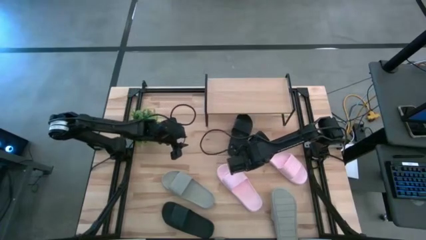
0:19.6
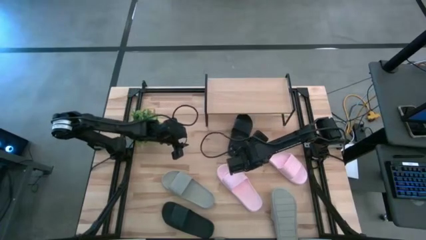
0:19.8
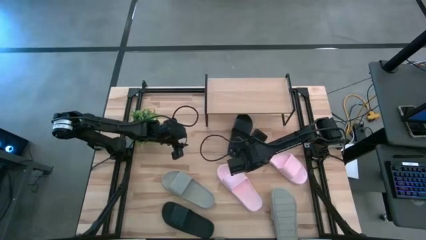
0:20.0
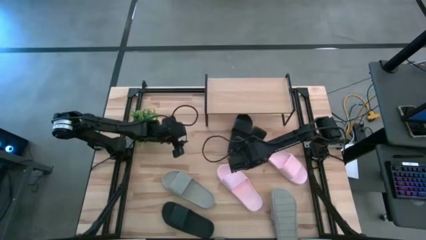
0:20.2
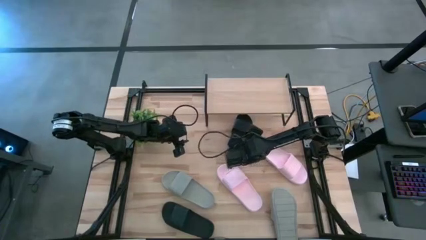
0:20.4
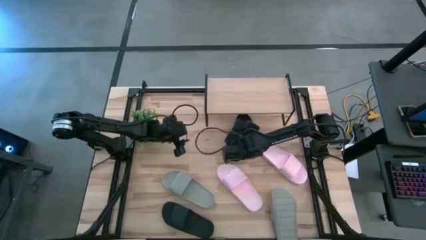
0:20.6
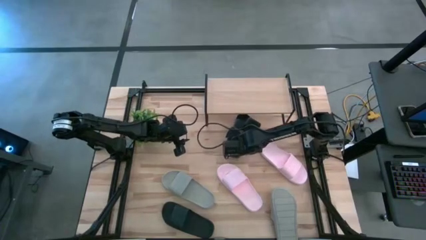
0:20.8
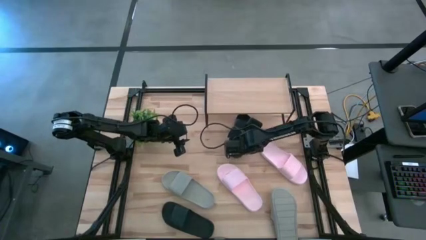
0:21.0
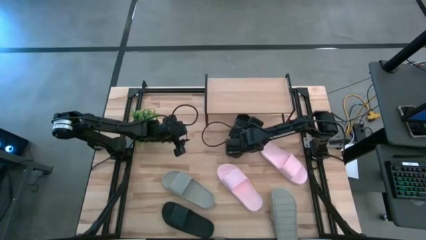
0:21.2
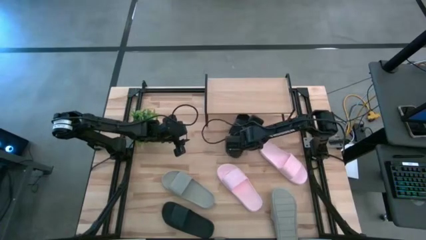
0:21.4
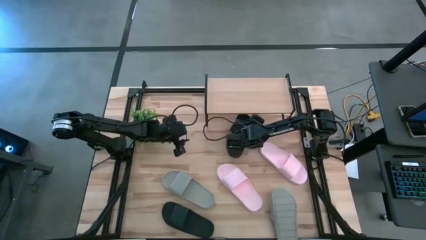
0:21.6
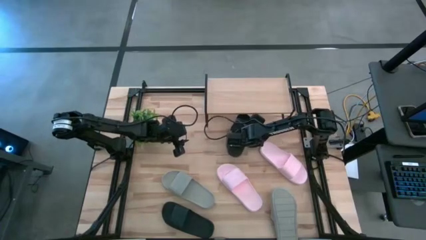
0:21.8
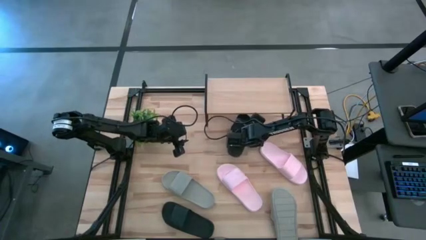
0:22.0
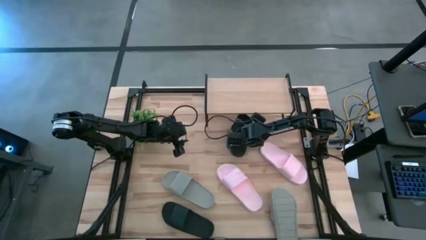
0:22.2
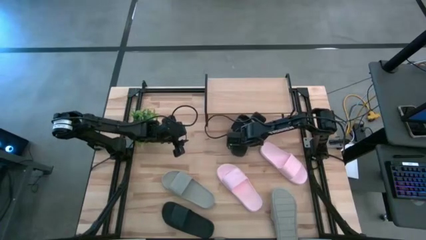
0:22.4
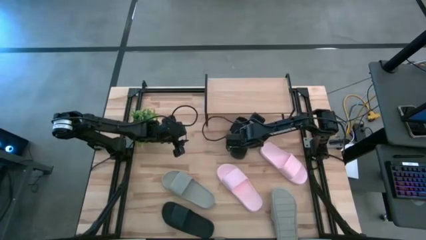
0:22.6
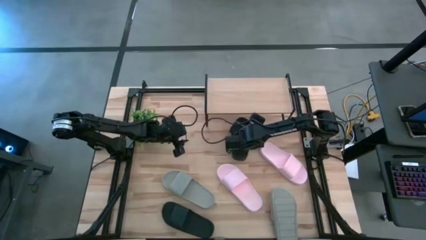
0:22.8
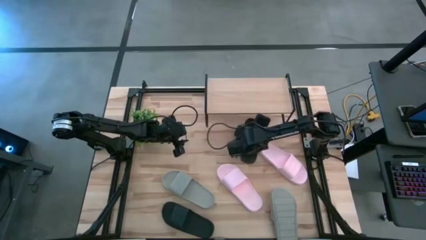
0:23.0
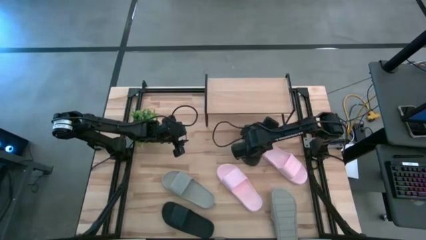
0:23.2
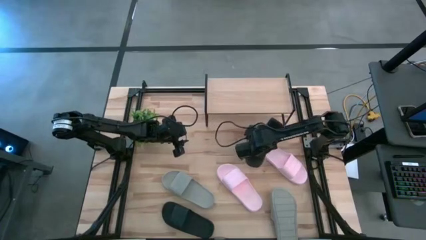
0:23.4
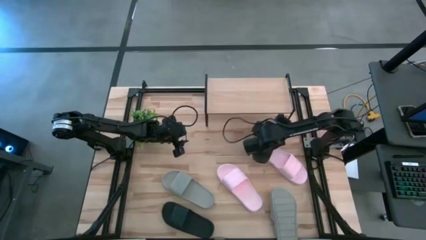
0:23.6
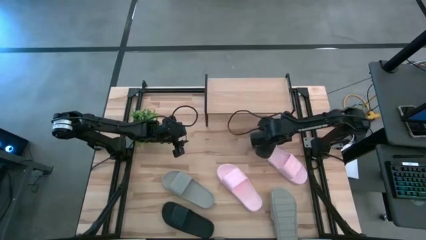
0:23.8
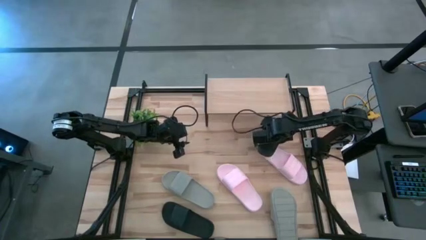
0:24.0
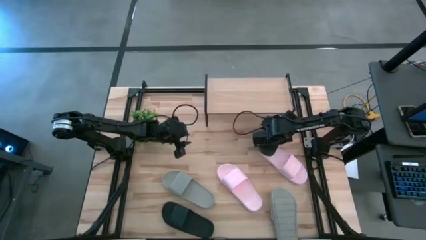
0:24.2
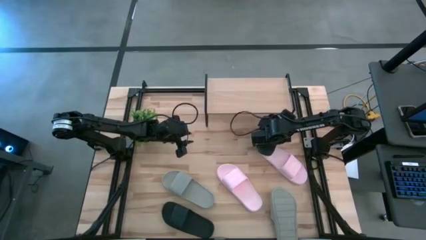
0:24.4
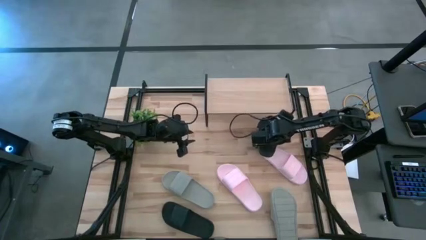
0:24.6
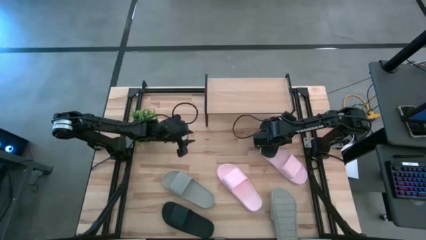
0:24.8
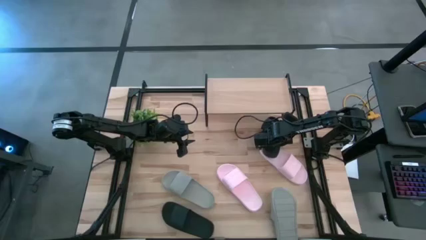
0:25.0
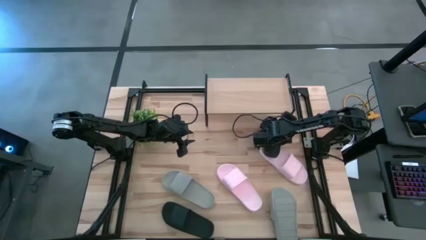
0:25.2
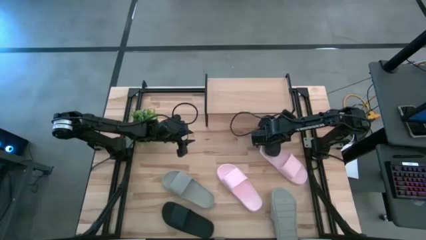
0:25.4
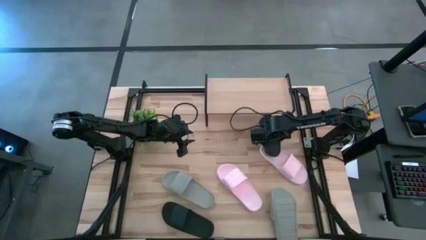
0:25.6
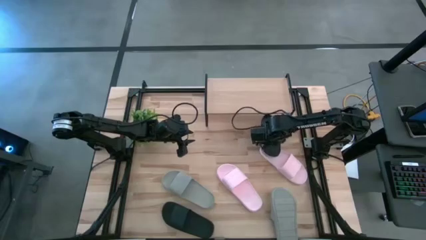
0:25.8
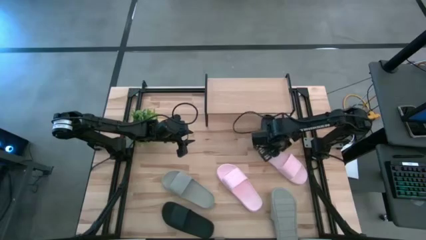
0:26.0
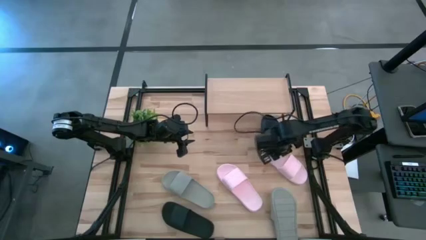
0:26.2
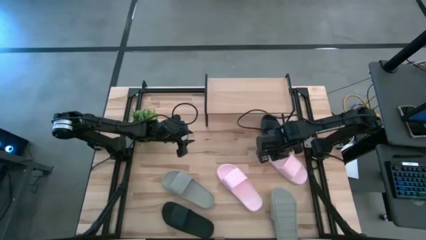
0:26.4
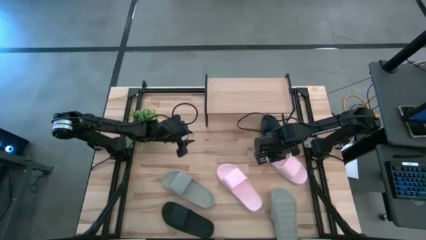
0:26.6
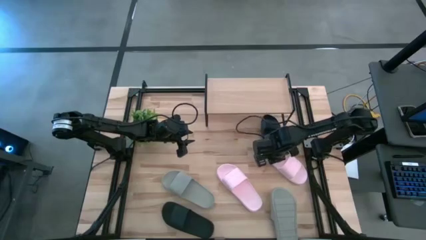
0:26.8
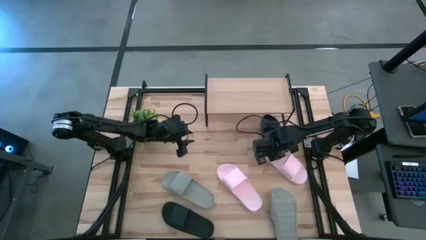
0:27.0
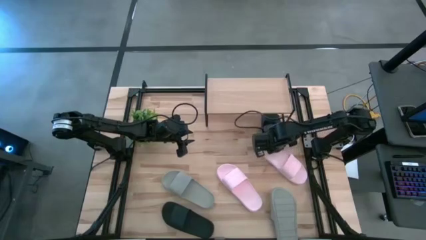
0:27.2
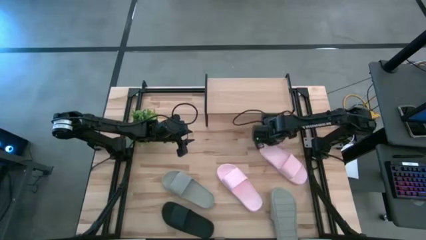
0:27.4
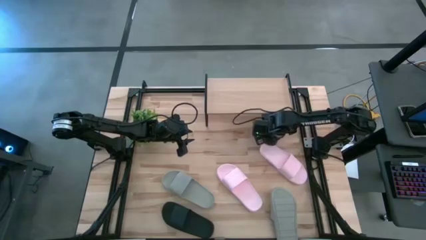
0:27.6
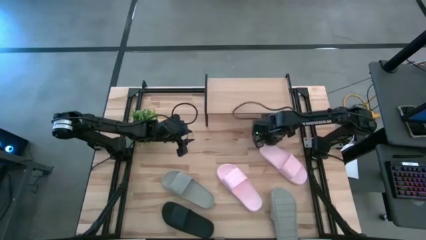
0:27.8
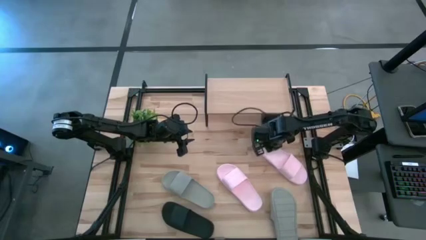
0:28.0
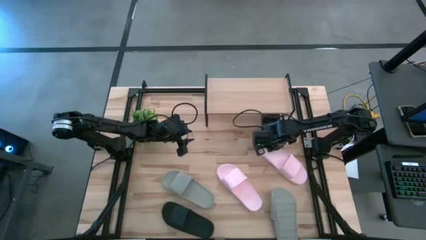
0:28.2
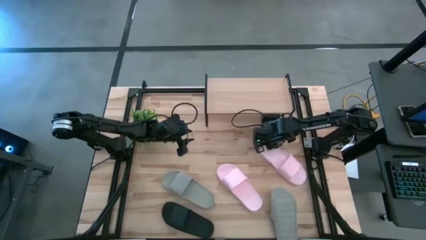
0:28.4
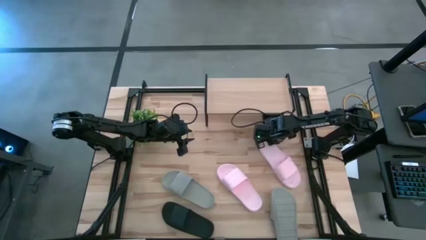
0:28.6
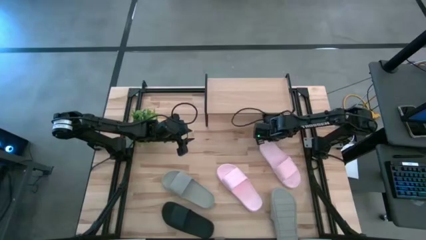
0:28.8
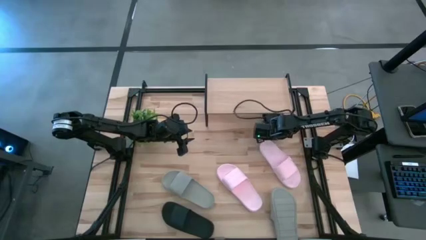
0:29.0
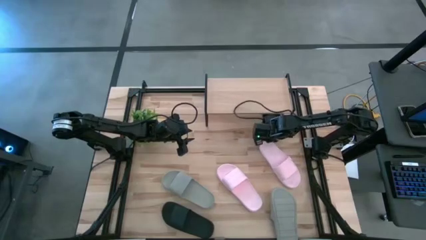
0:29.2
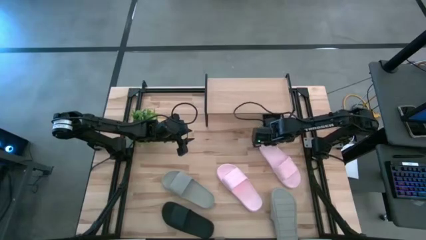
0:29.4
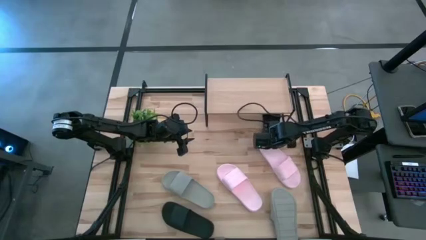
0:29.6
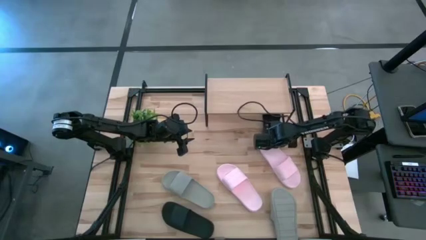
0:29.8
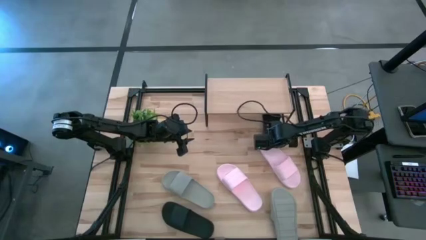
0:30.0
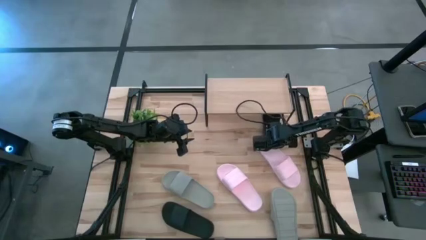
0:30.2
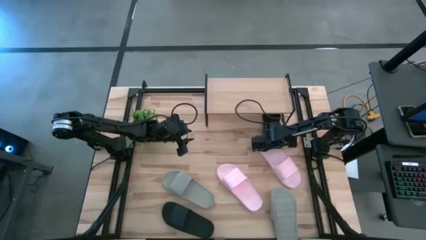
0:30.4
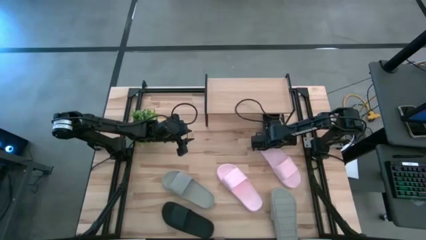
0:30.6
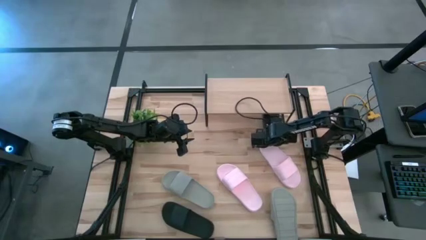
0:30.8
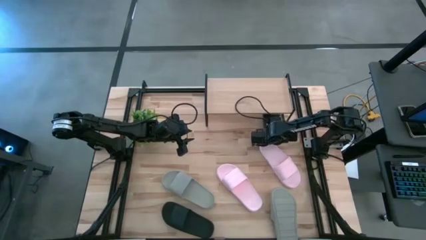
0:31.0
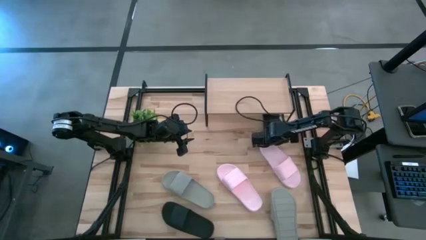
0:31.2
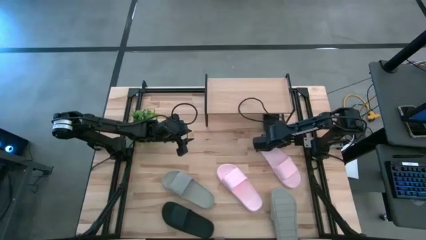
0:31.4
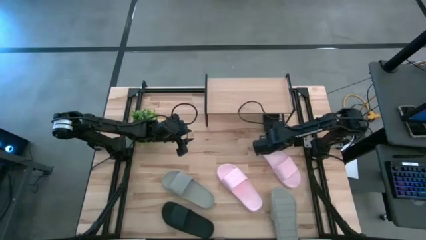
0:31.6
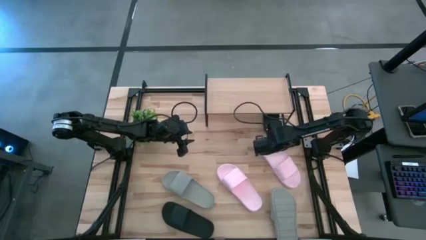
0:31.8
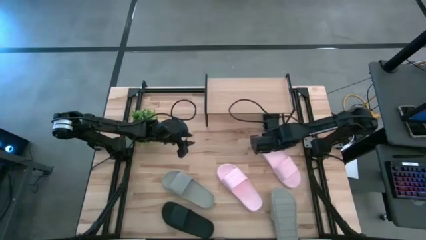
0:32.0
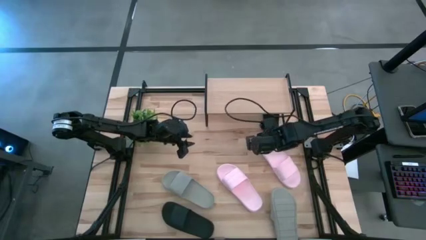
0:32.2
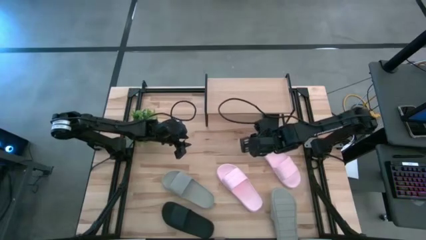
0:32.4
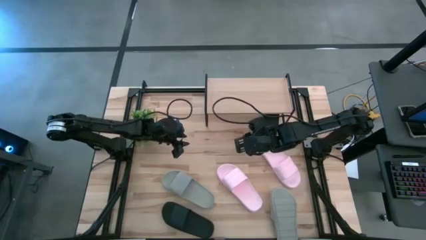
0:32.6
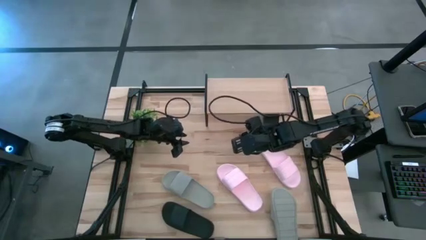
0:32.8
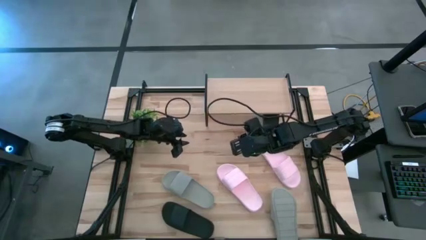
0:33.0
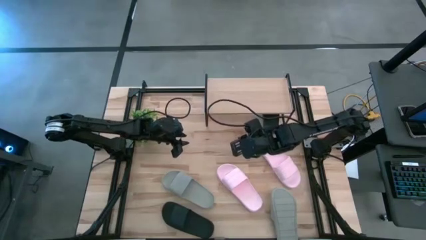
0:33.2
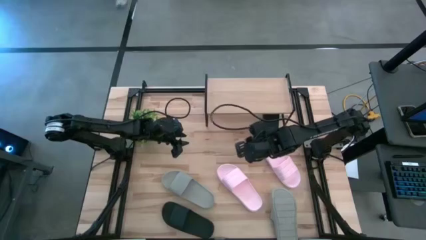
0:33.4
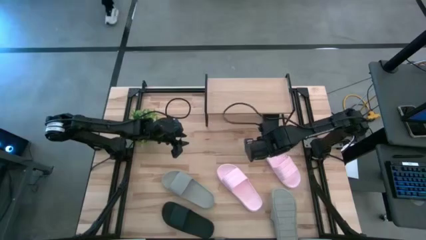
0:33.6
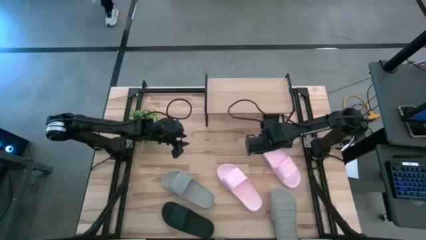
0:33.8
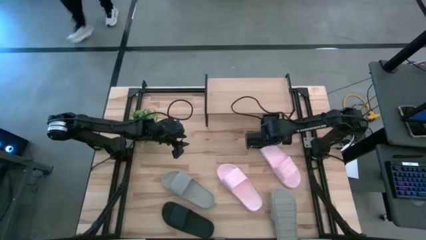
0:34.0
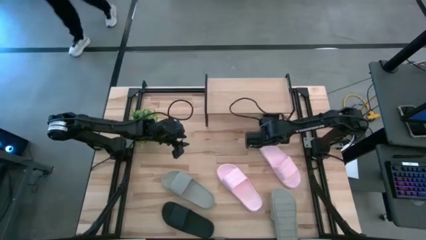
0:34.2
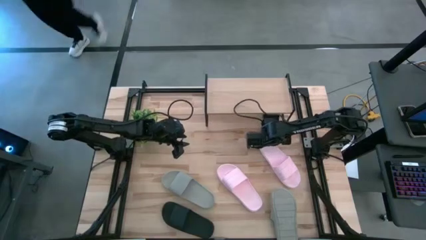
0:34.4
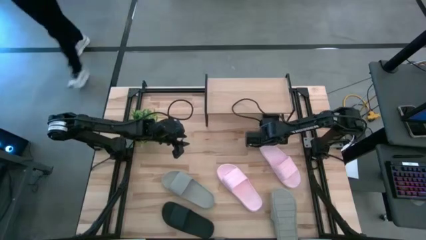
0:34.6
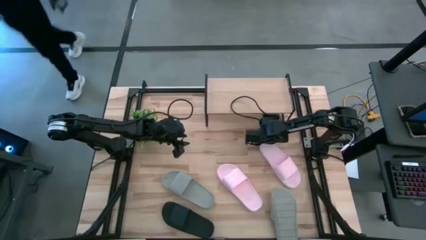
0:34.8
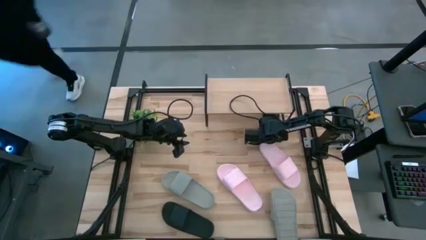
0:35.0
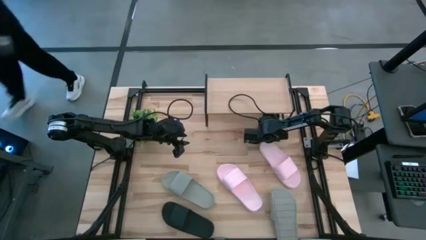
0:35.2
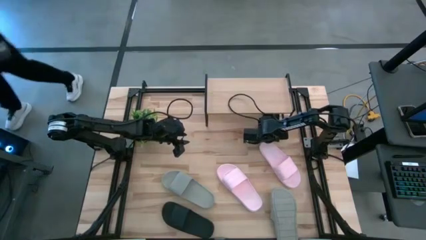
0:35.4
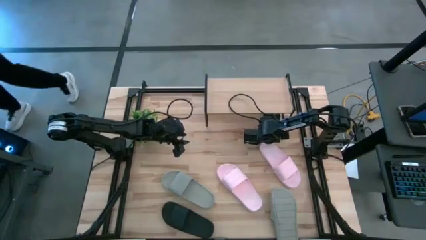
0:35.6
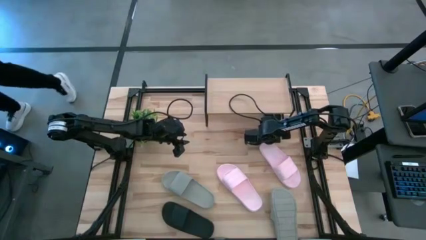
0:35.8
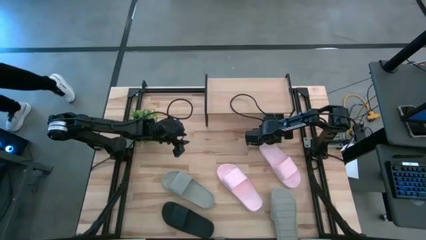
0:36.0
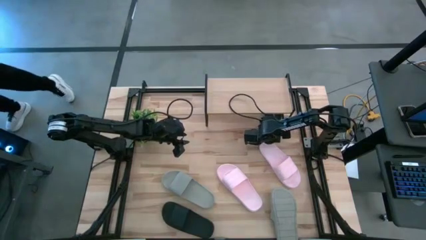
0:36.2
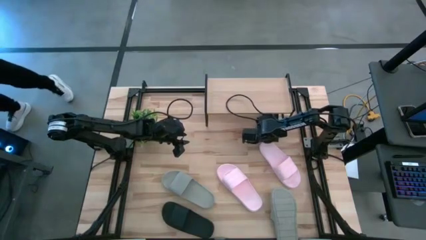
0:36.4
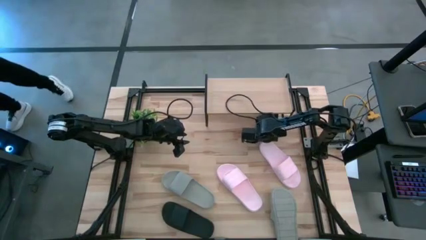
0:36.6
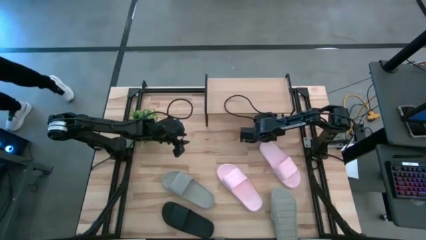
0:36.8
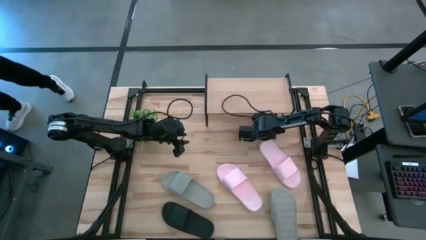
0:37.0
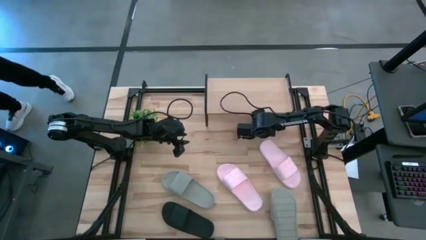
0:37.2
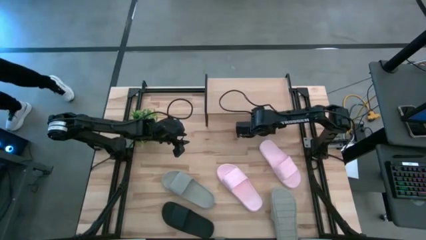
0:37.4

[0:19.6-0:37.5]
Task: Pick and place slides into the shelf
Move the top black slipper under the shelf
